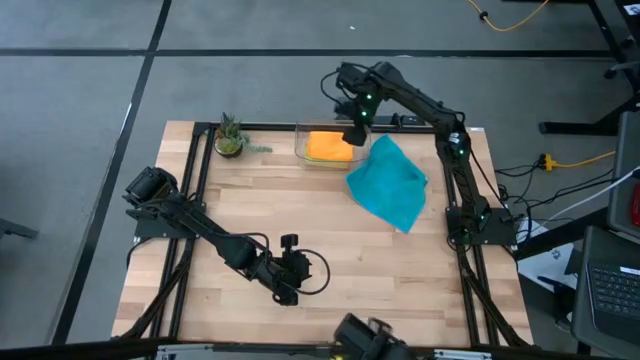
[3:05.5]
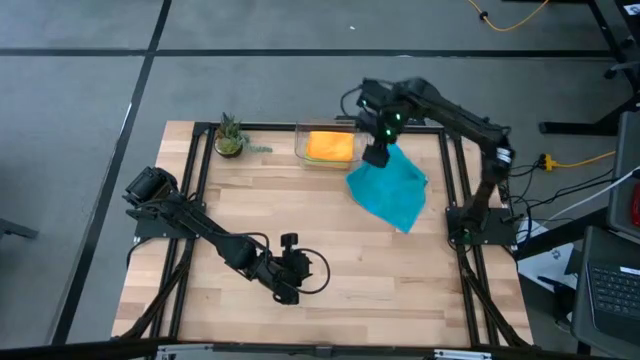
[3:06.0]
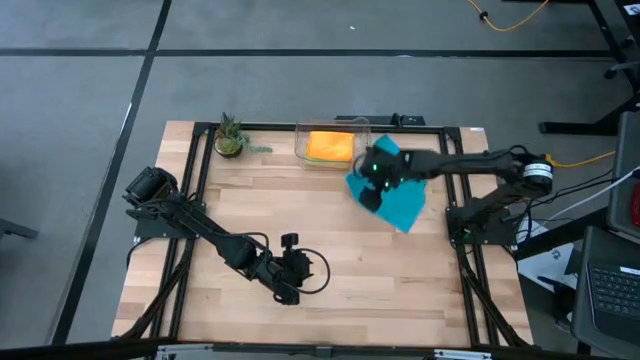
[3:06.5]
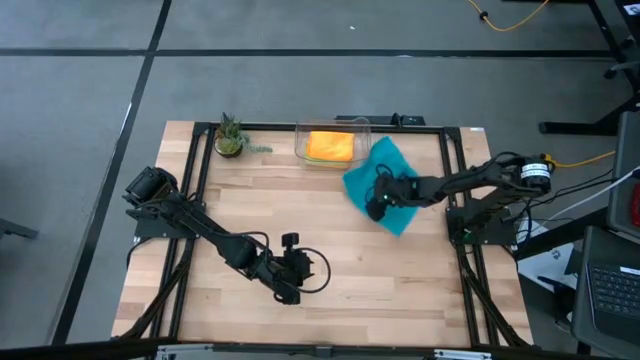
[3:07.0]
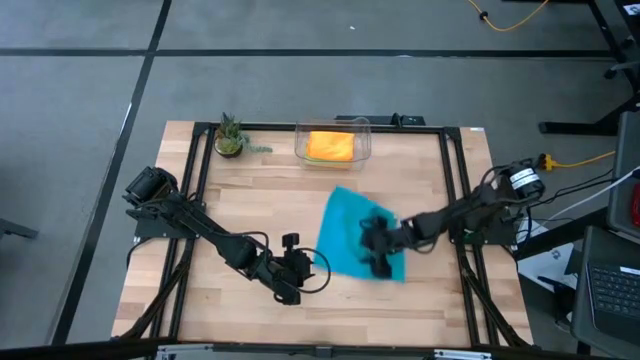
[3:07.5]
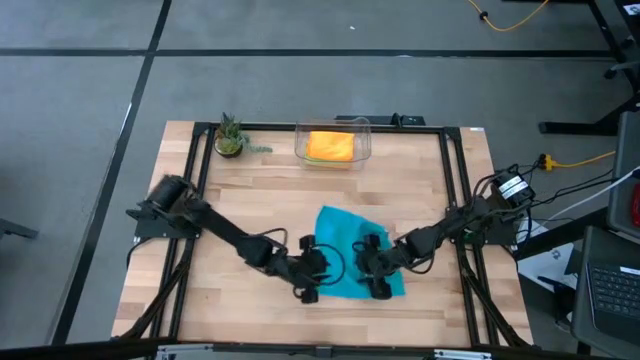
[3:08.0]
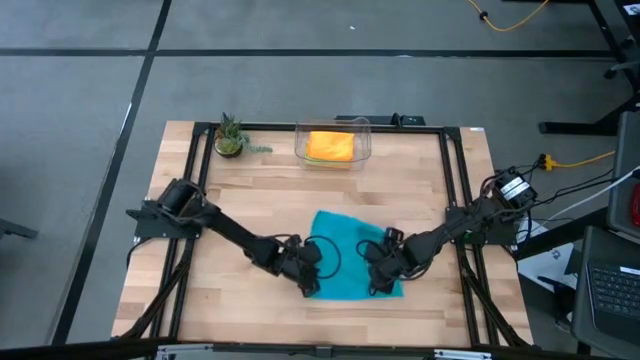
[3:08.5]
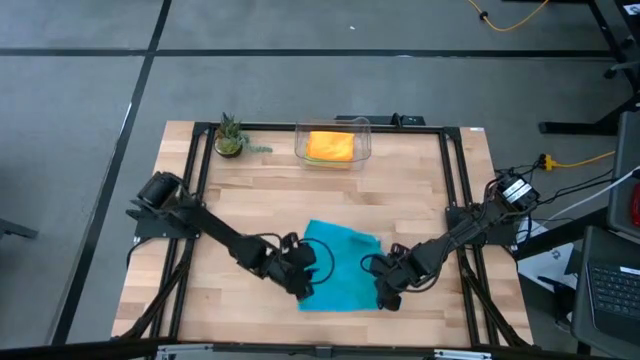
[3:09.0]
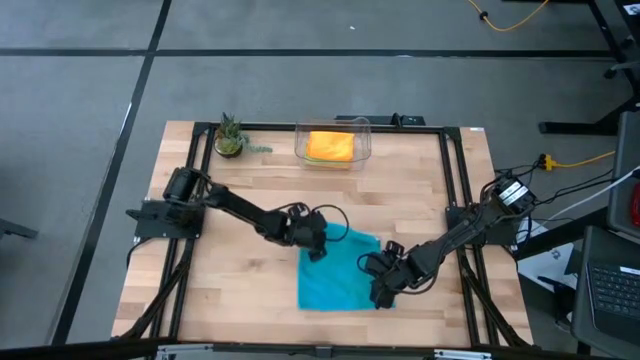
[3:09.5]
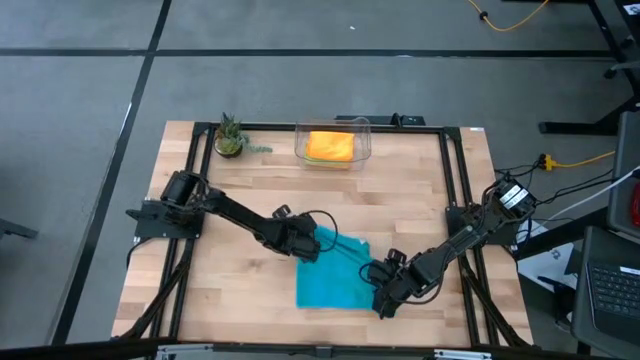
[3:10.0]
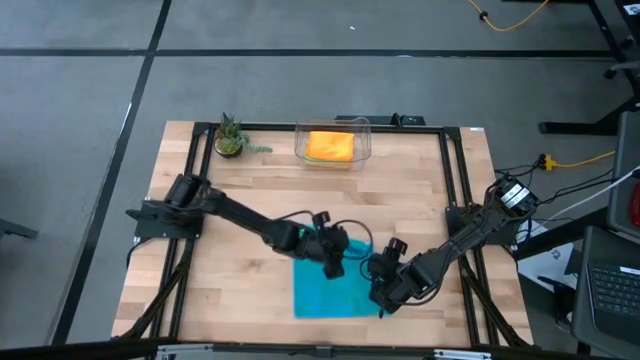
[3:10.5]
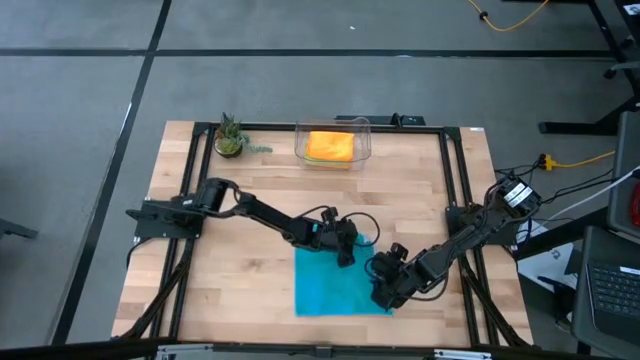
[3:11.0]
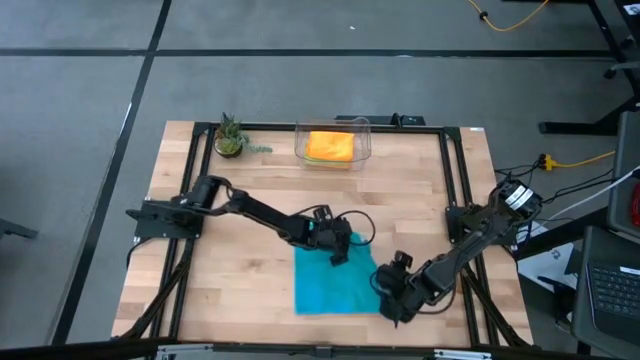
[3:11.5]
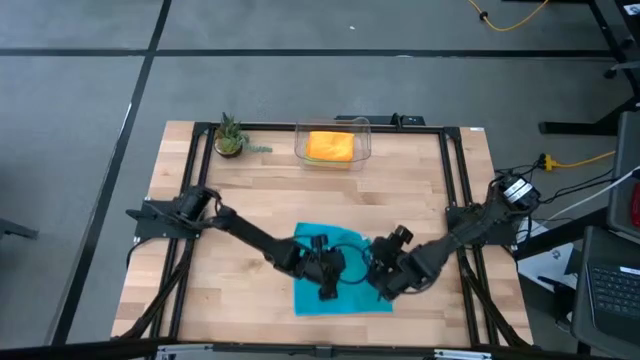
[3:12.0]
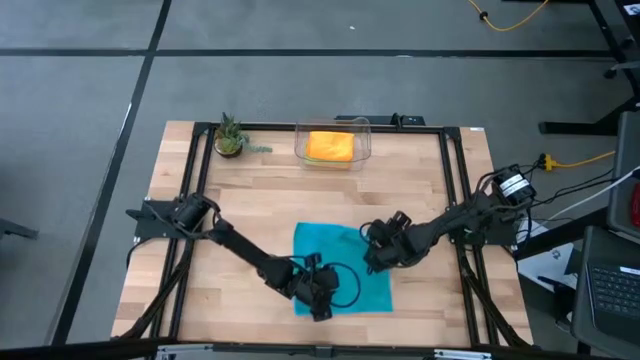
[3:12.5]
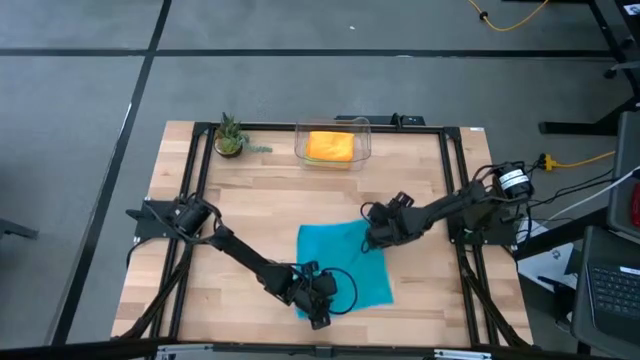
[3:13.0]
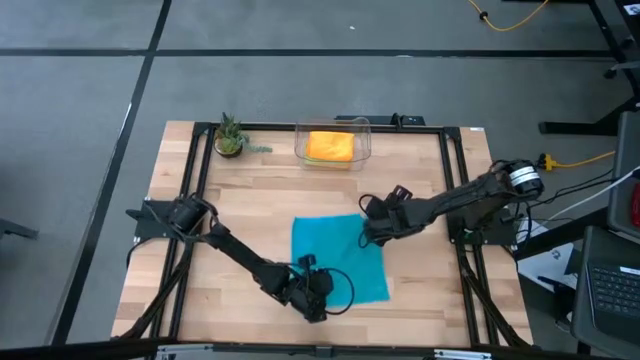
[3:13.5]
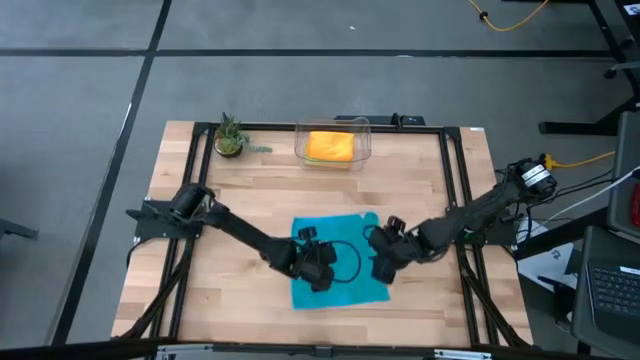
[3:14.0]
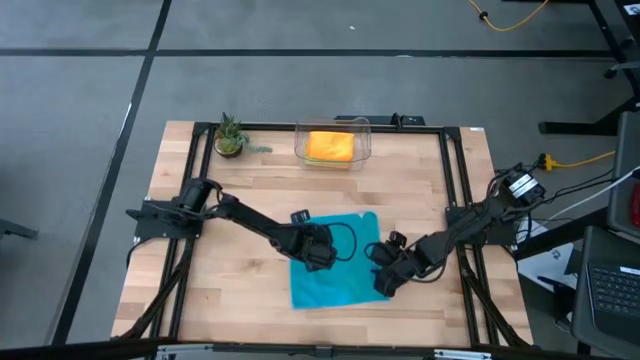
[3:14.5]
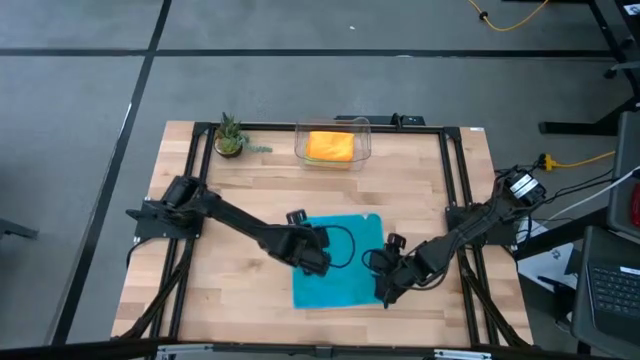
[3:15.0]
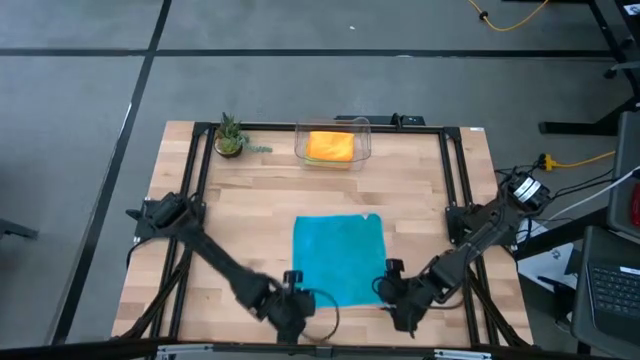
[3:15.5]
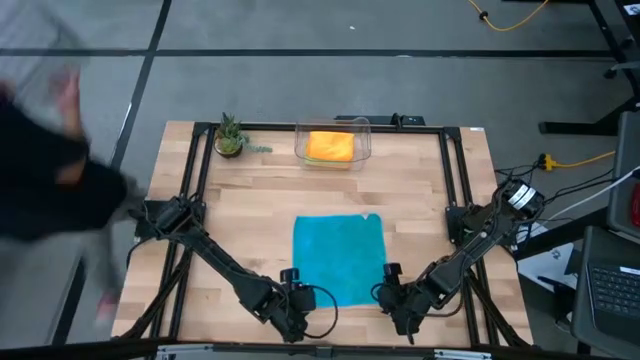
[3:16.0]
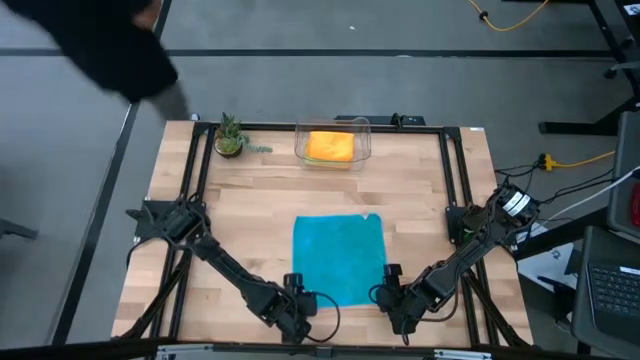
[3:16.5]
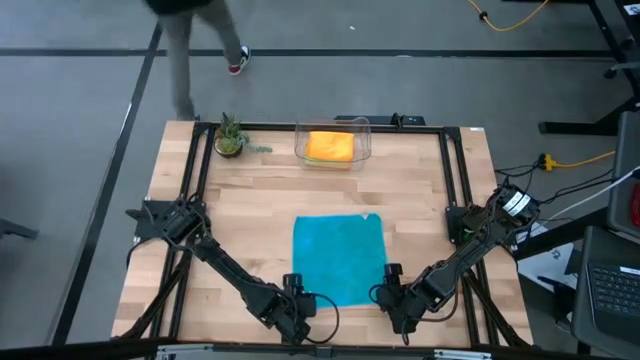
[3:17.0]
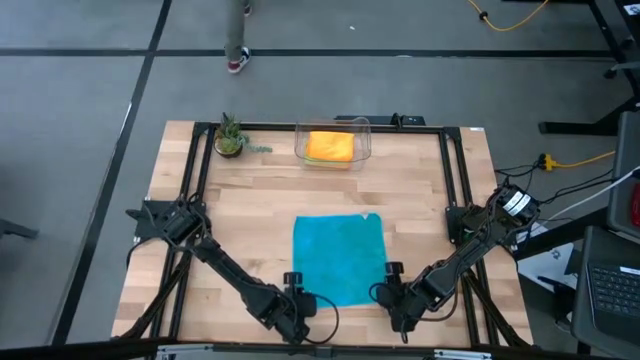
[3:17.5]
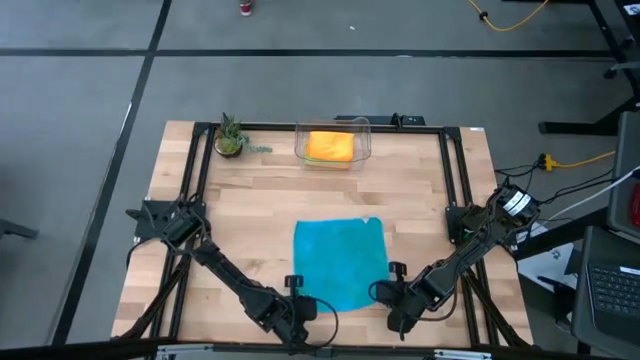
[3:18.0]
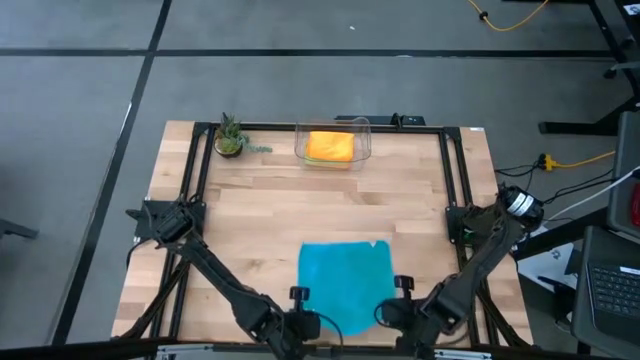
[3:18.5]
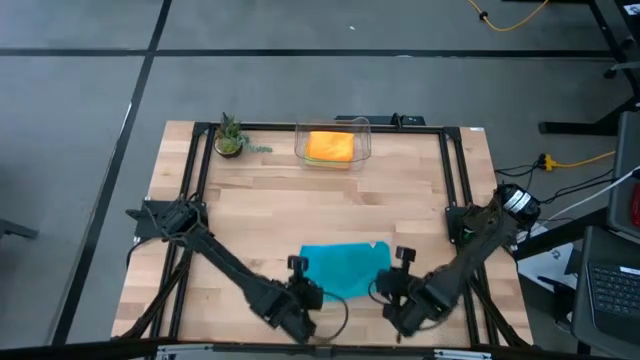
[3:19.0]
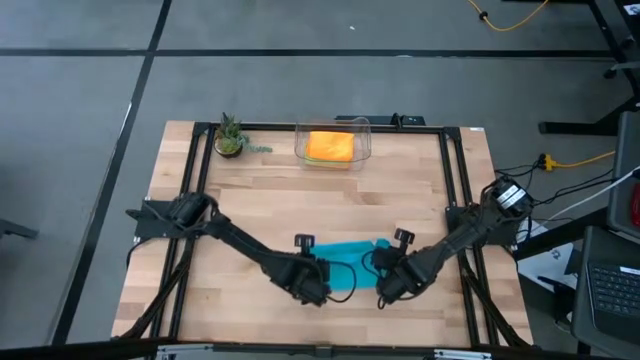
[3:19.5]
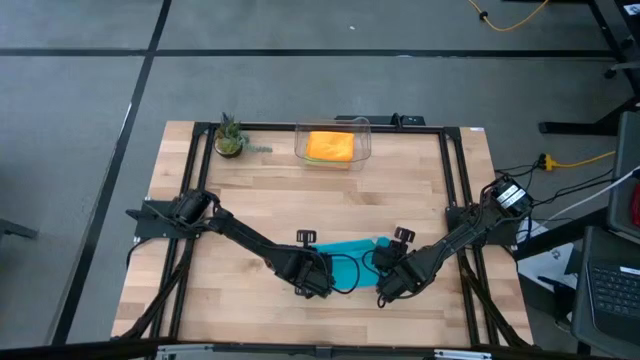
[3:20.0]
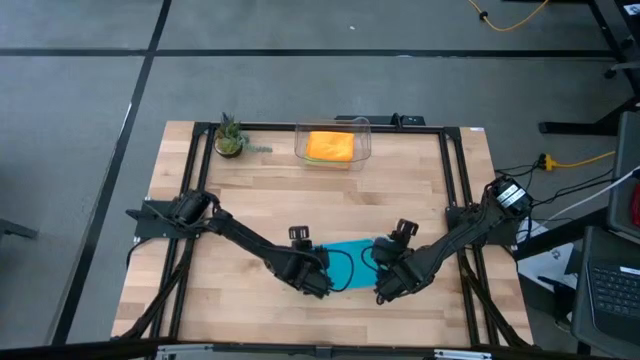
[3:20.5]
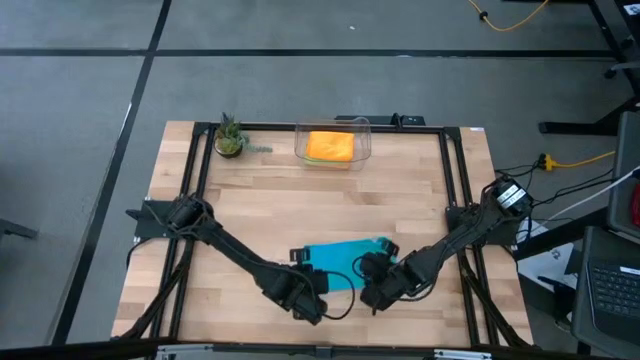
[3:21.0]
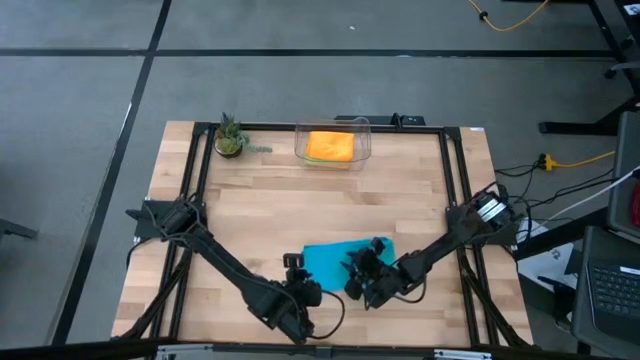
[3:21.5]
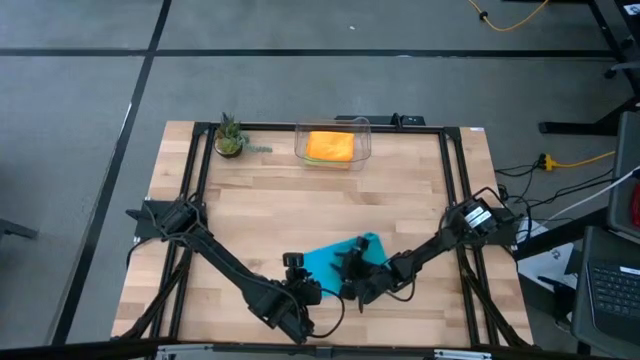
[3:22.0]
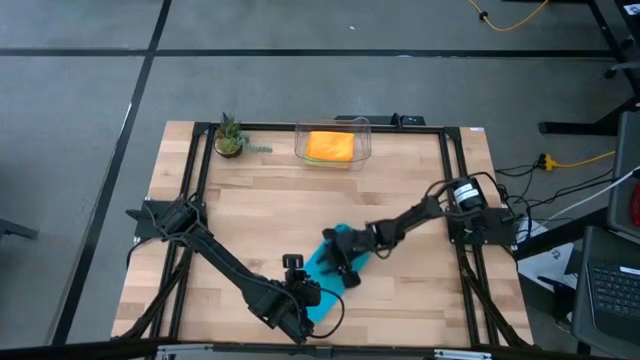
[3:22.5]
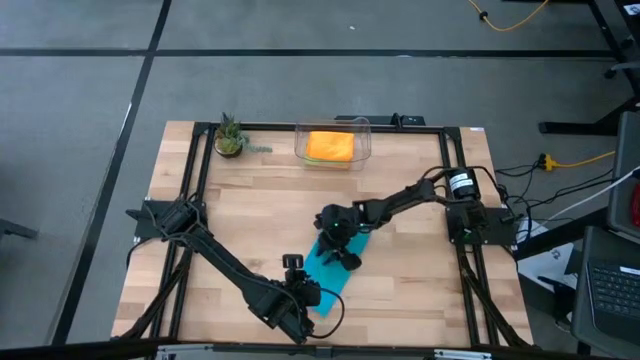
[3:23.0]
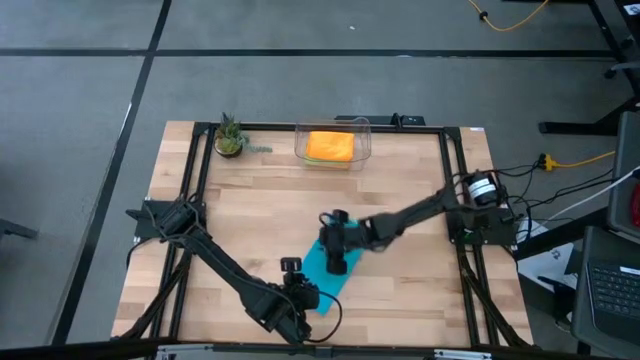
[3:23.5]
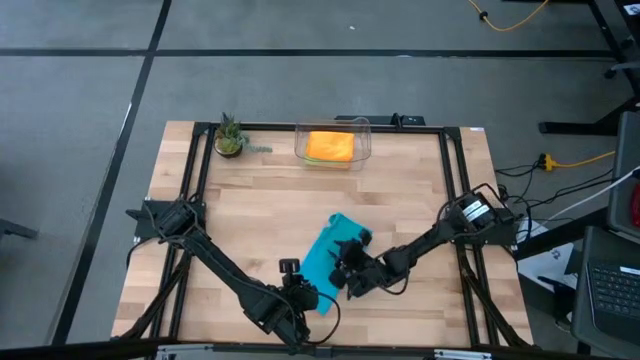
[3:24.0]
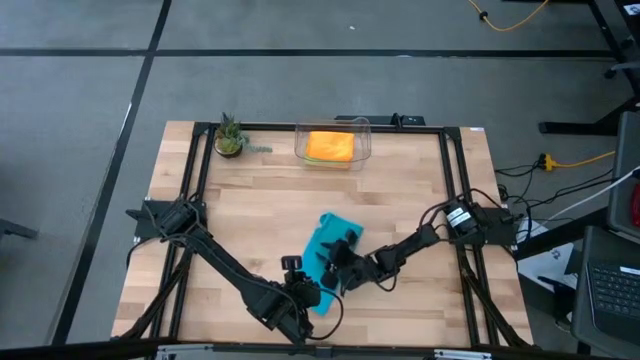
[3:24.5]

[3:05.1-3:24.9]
Task: Fold microfiber towels
Fold the blue microfiber cloth

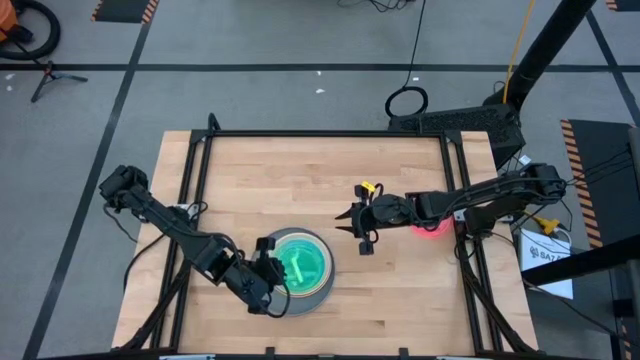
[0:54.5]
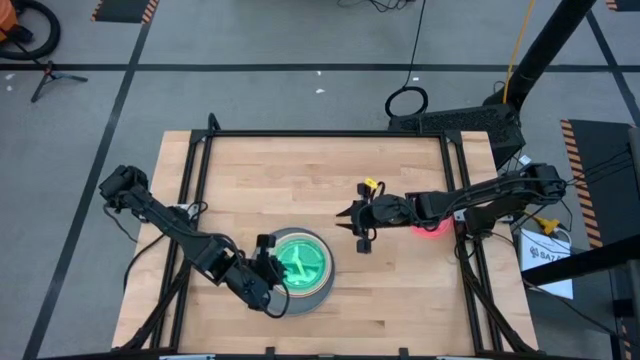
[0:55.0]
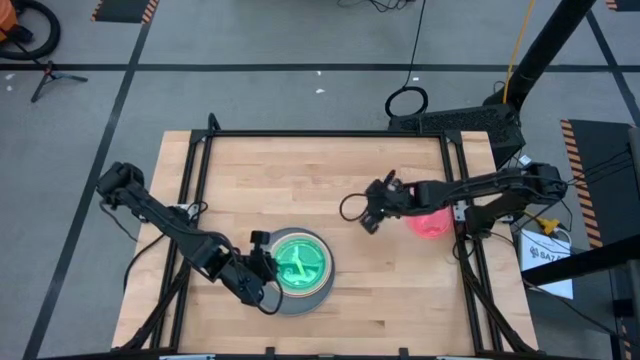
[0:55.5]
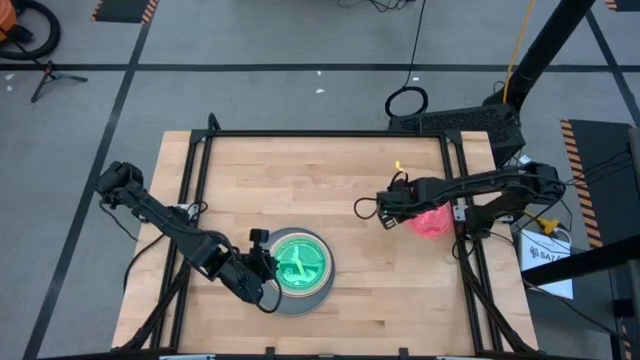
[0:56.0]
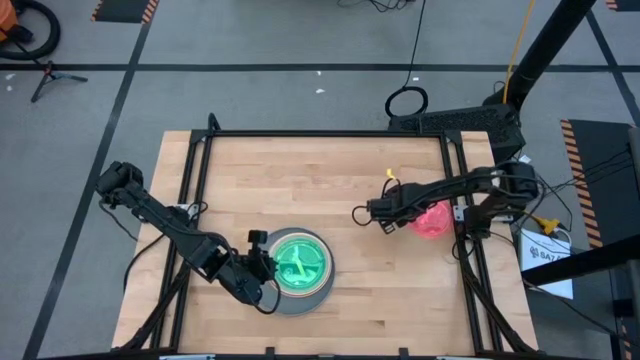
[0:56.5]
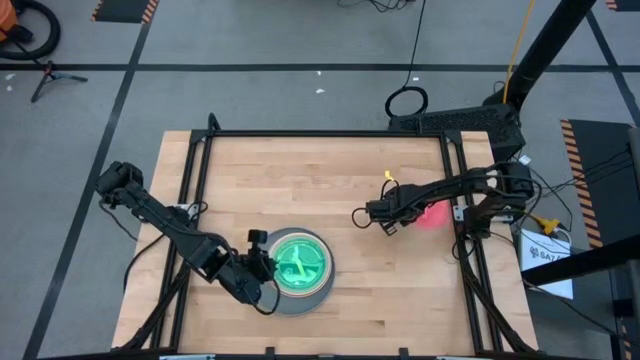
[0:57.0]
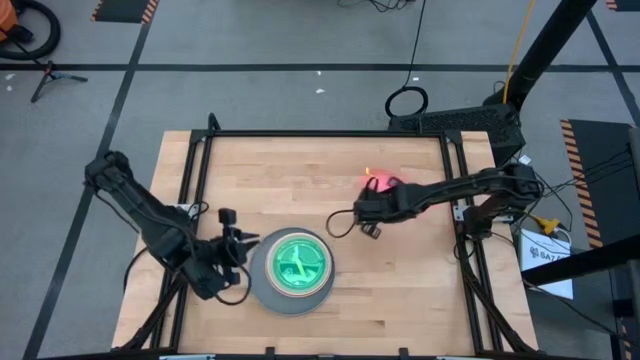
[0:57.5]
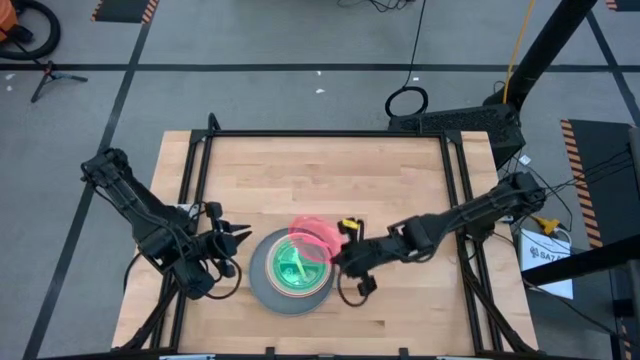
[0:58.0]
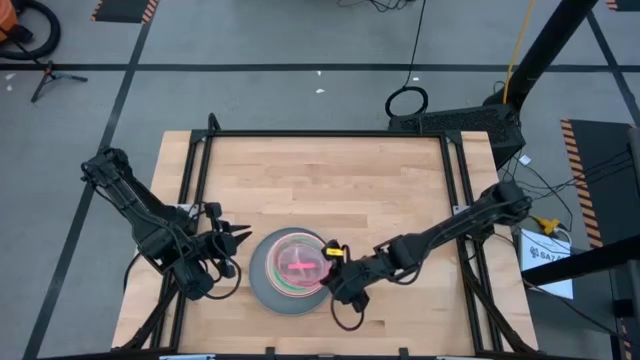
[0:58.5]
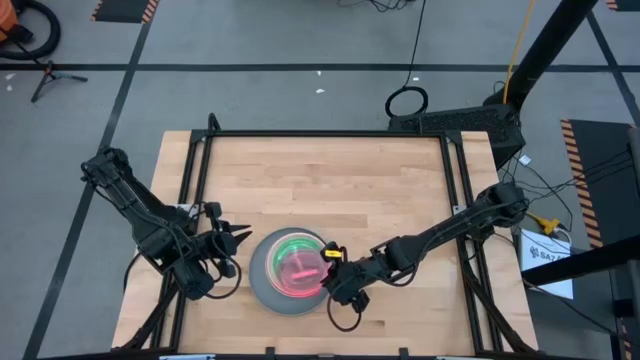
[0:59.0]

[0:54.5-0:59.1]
Task: Stack plastic plates
Stack the pink plate on top of the green plate
